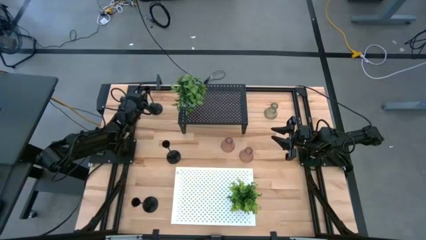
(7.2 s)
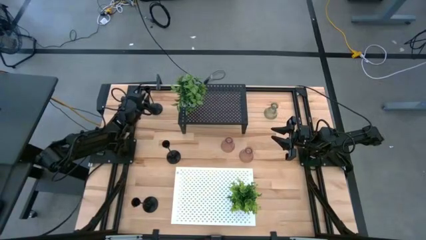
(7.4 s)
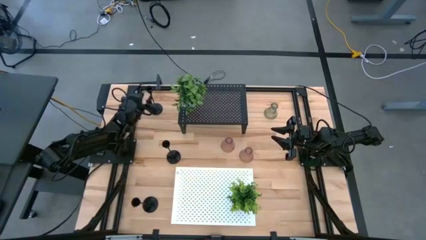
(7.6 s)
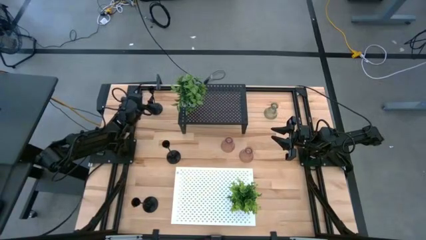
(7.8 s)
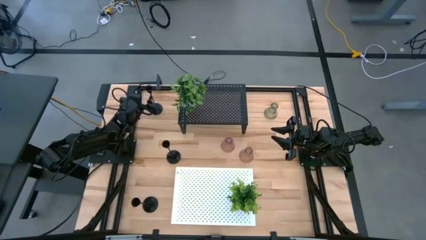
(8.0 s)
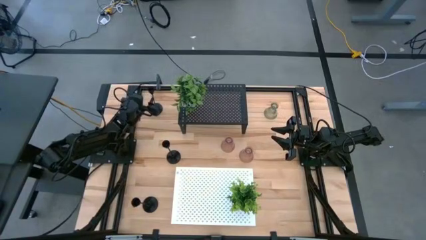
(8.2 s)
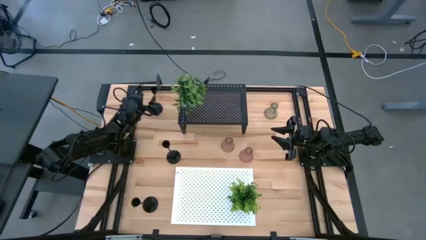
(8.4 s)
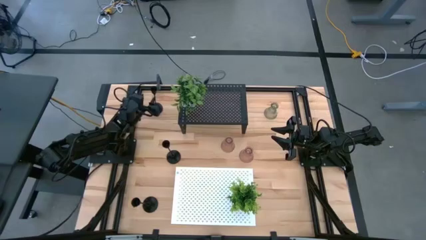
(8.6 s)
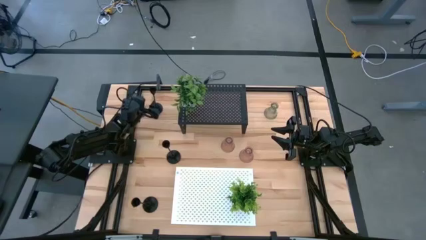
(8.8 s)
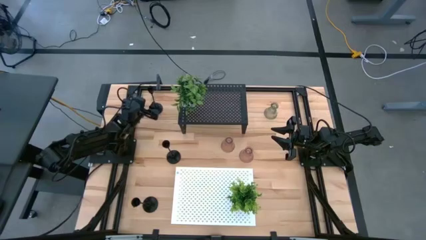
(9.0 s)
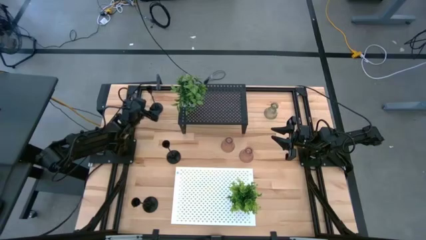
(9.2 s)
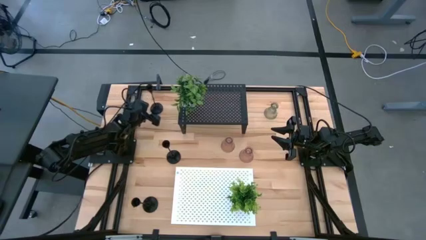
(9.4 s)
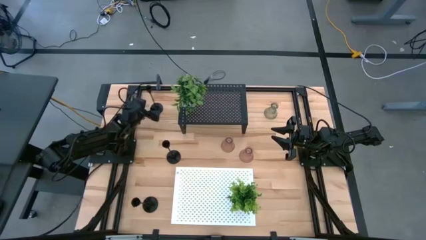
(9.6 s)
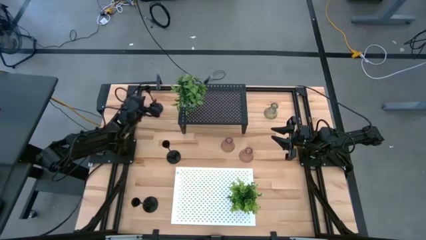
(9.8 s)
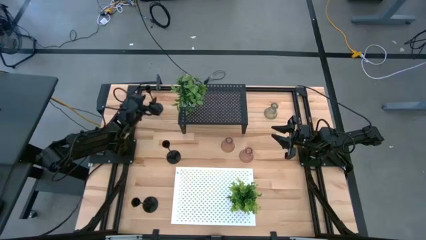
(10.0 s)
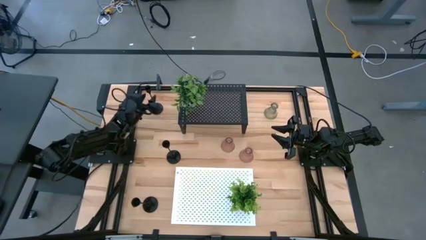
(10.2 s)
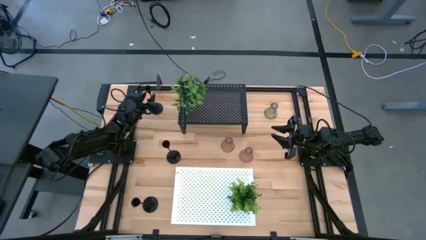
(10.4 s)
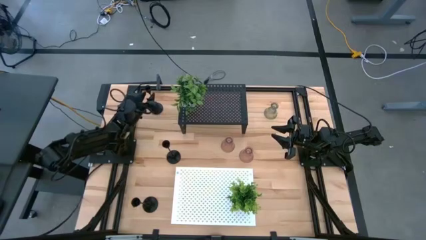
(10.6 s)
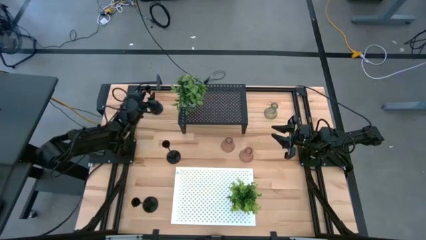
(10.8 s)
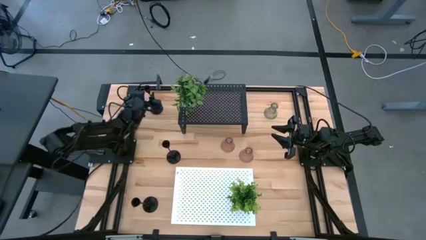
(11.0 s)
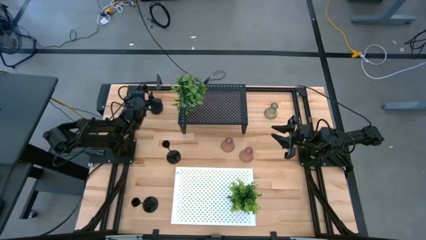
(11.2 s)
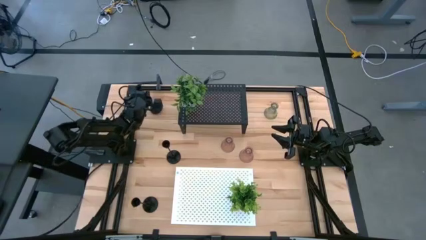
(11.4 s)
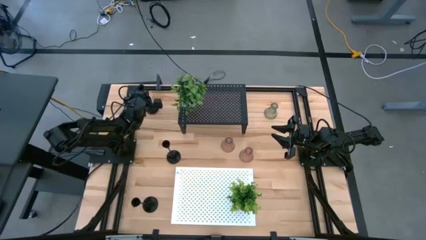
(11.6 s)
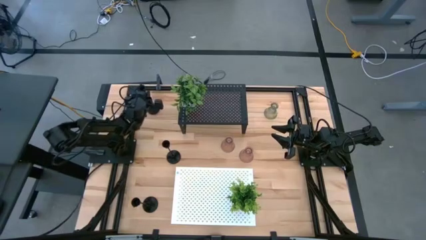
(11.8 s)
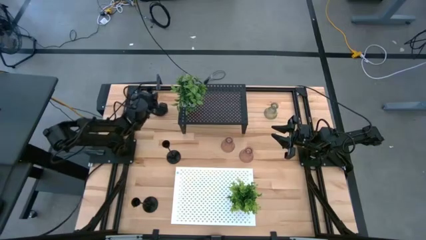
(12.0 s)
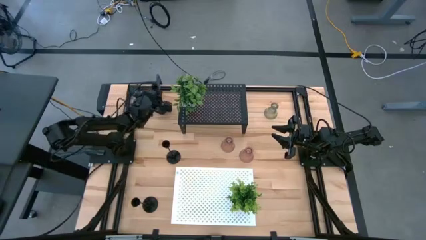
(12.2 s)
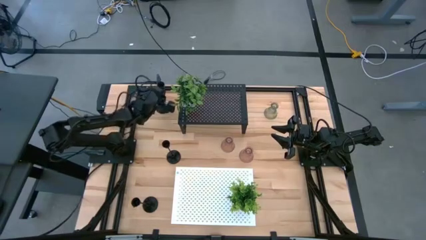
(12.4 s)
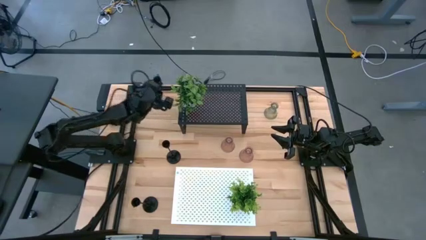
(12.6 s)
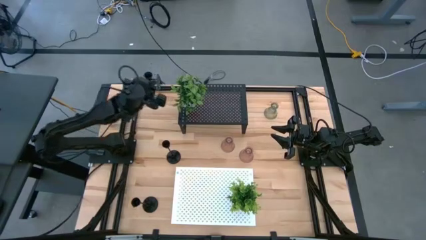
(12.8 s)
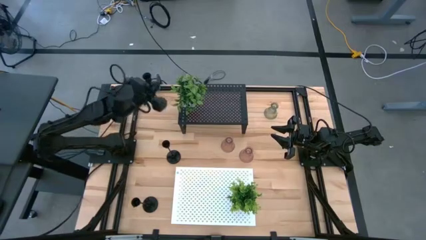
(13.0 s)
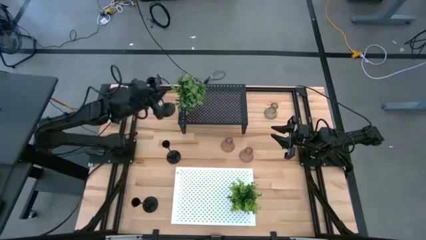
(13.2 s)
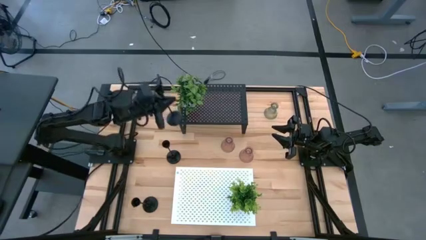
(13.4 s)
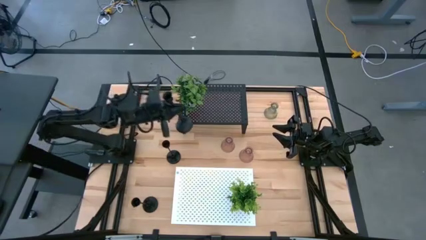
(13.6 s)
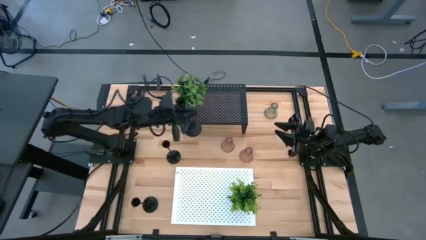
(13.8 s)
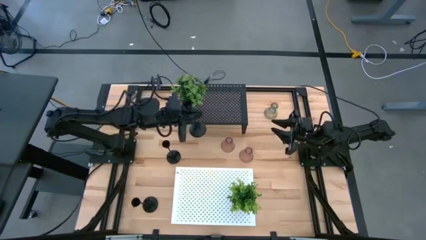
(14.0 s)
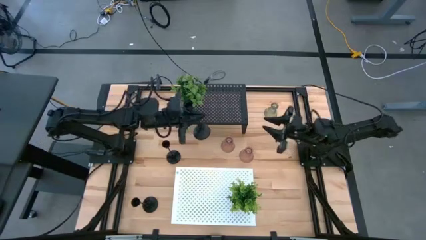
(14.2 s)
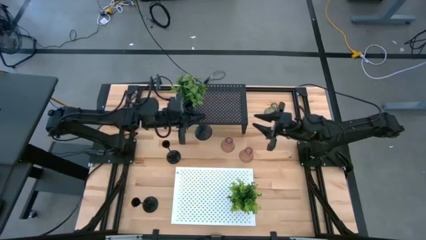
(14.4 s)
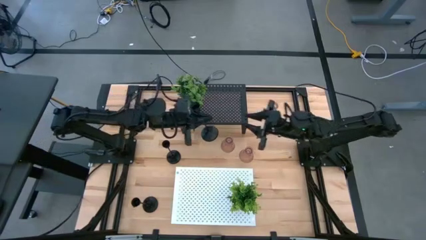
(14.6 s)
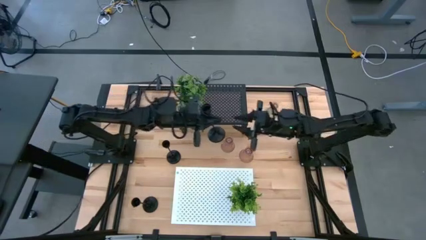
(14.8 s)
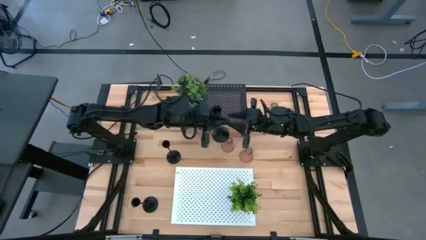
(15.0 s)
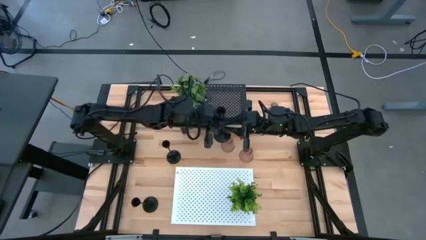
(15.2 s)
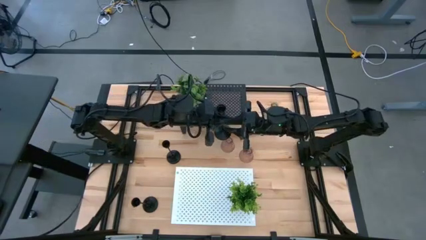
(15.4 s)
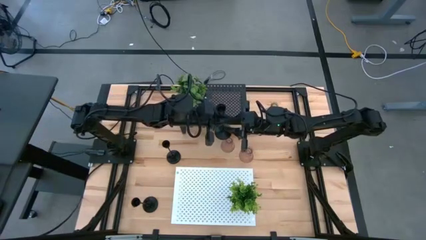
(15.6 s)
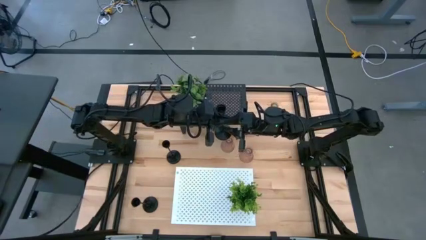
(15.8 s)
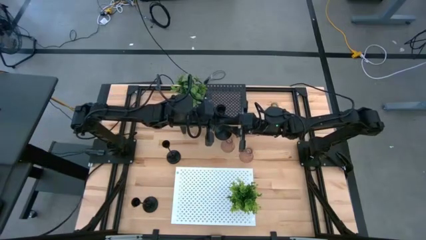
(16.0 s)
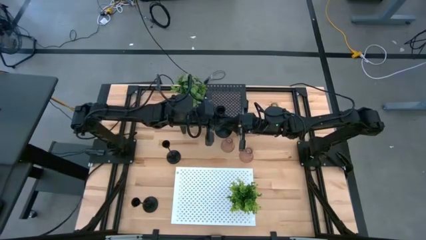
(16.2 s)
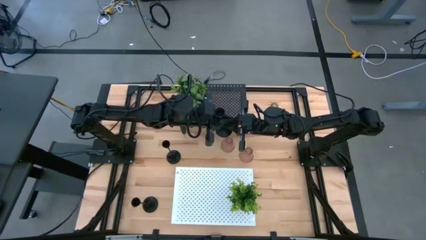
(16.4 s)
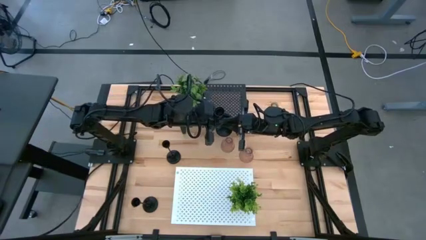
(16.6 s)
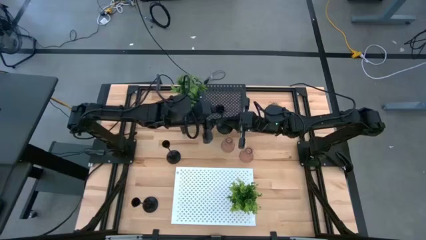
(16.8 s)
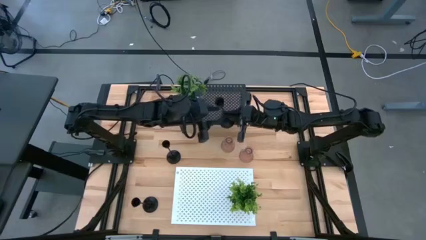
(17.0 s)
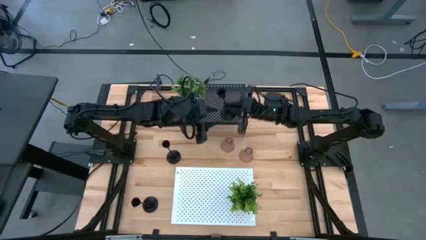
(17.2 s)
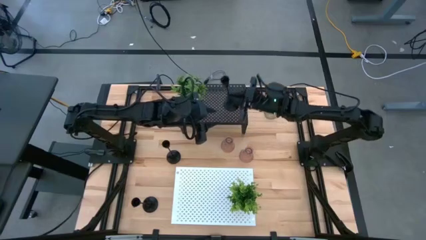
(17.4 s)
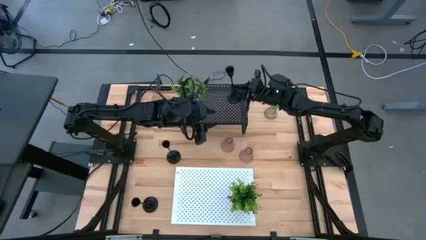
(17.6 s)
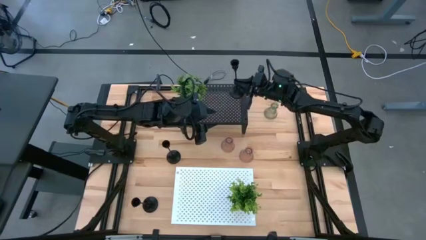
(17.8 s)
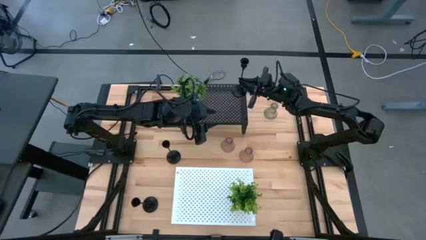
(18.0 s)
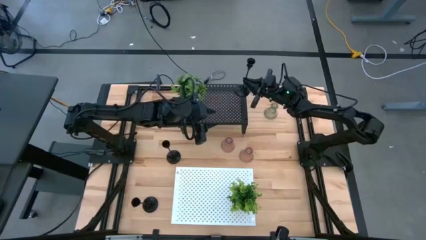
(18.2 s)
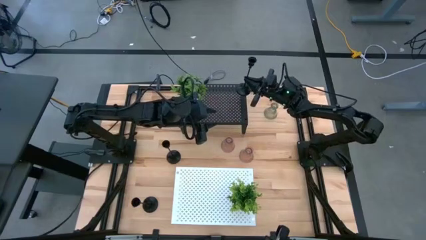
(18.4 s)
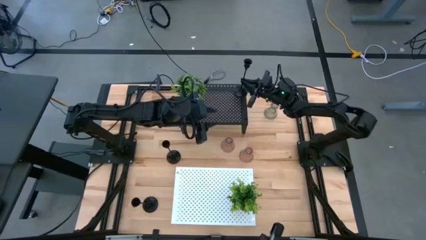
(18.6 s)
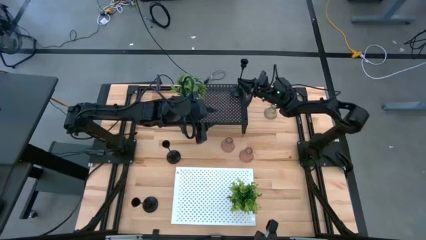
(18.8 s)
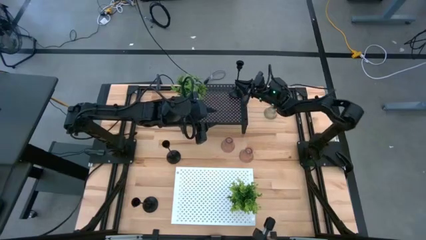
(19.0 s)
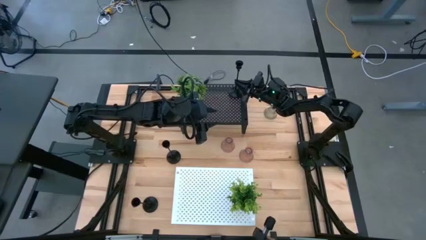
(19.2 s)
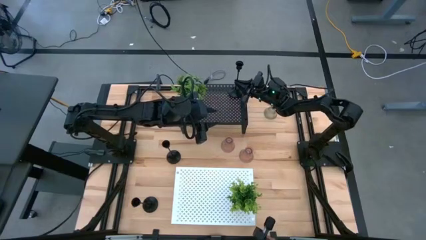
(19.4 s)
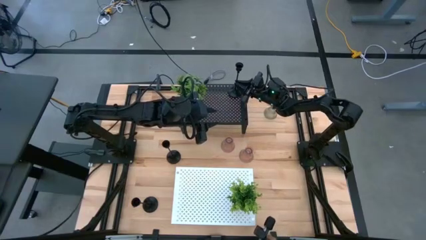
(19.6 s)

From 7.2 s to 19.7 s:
Task: Pick & Place candle stick holders
Put the big black candle holder on the black shelf
